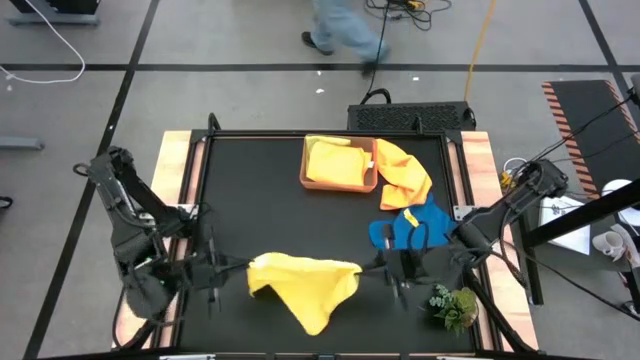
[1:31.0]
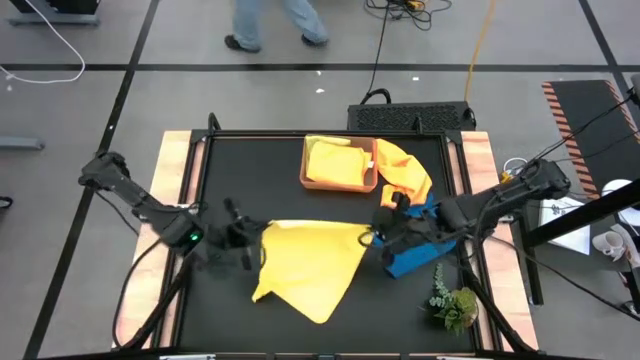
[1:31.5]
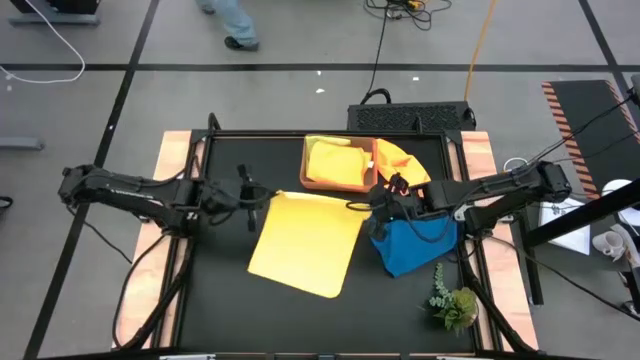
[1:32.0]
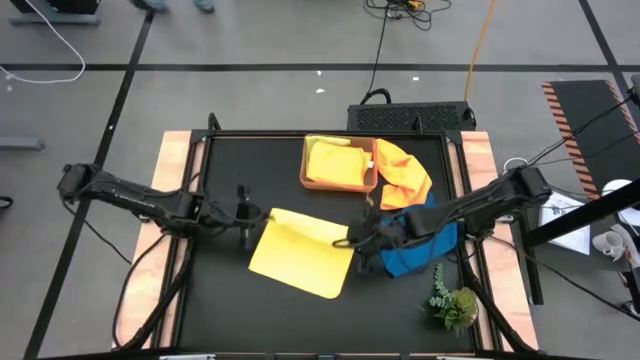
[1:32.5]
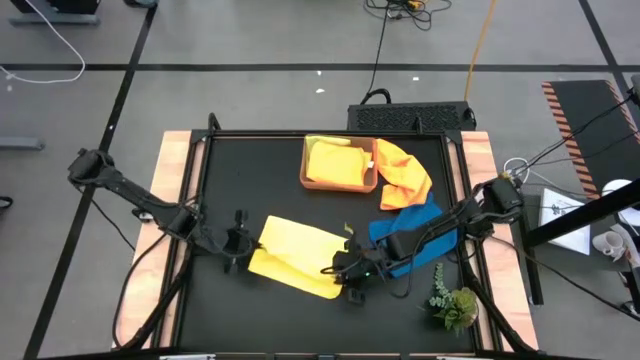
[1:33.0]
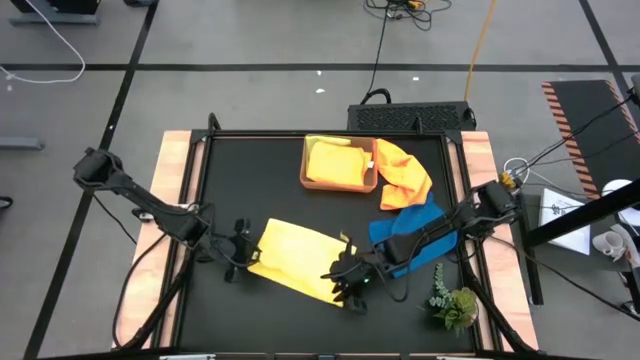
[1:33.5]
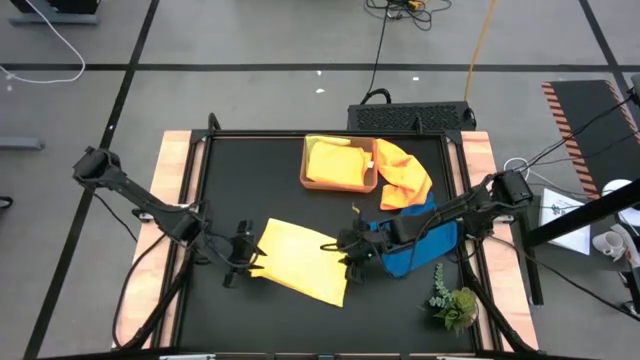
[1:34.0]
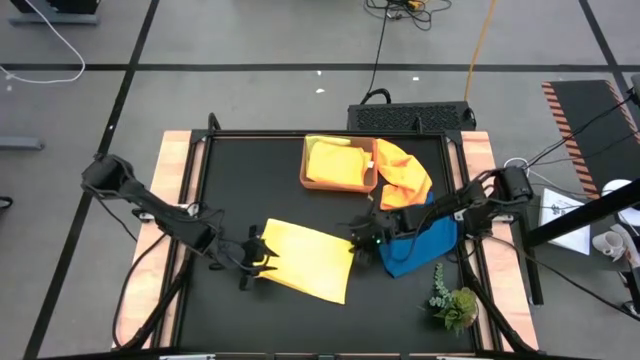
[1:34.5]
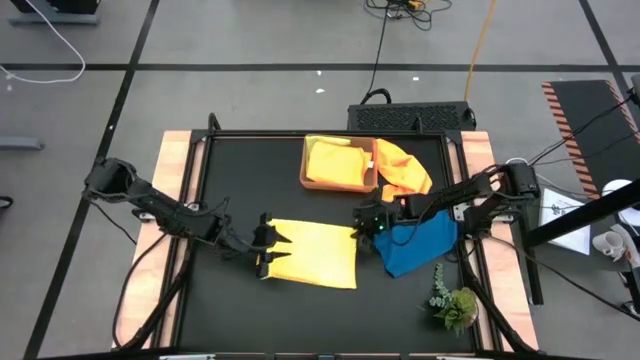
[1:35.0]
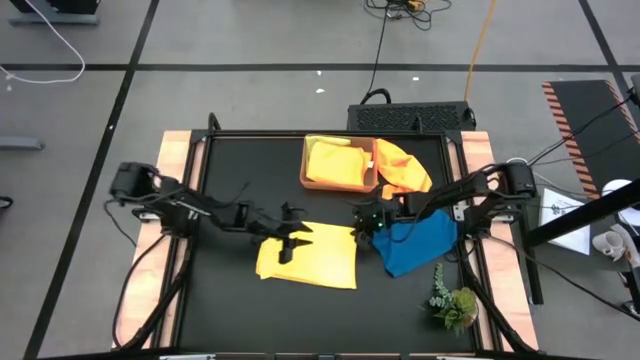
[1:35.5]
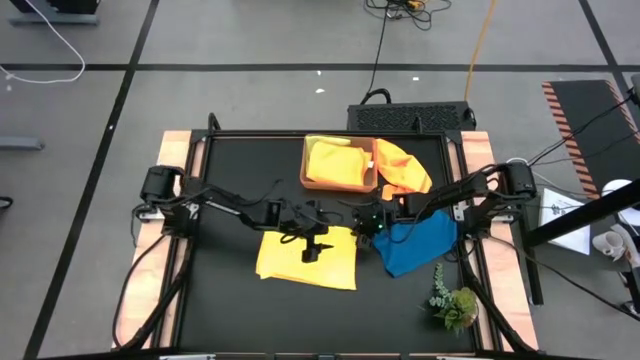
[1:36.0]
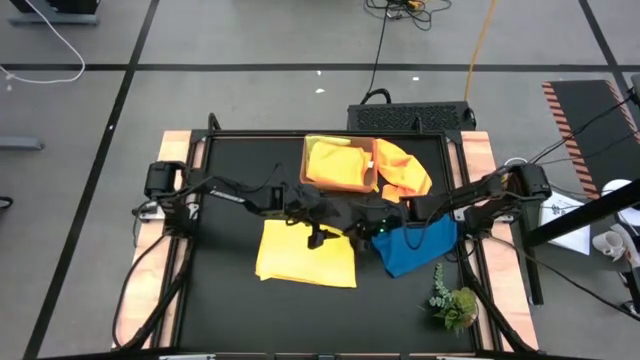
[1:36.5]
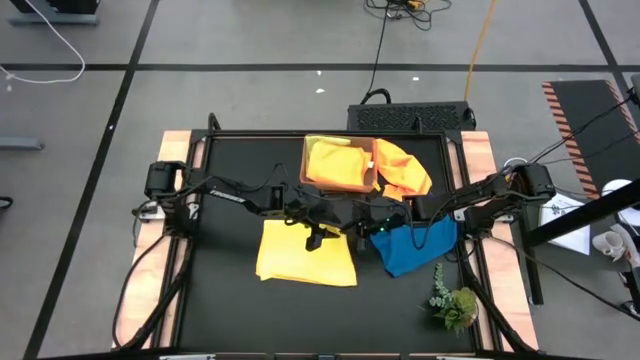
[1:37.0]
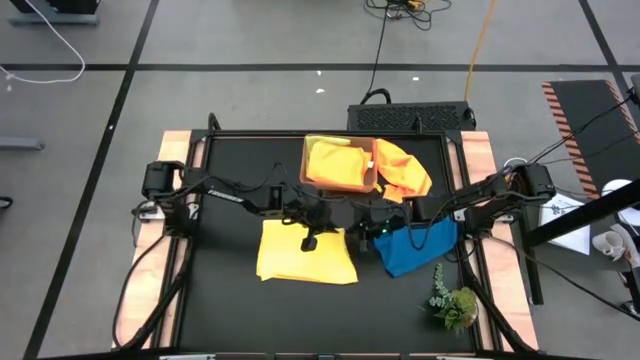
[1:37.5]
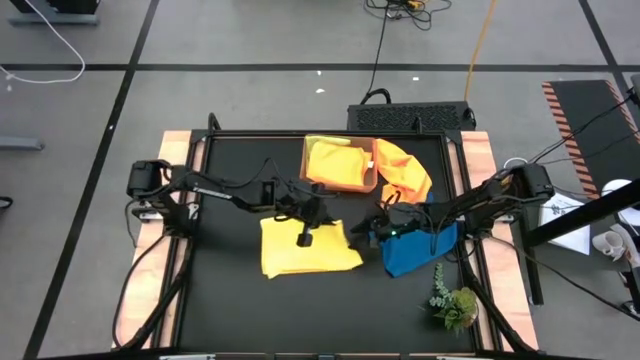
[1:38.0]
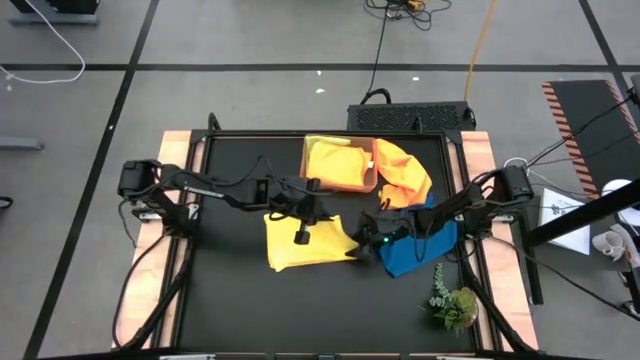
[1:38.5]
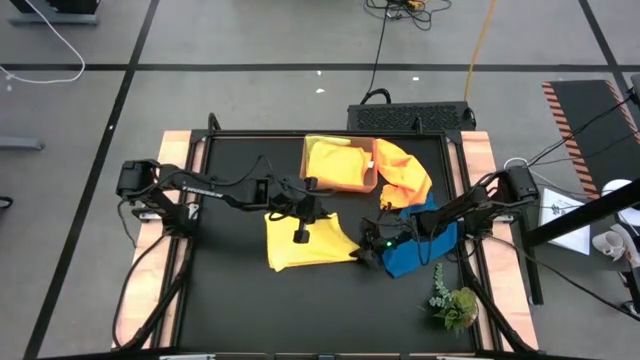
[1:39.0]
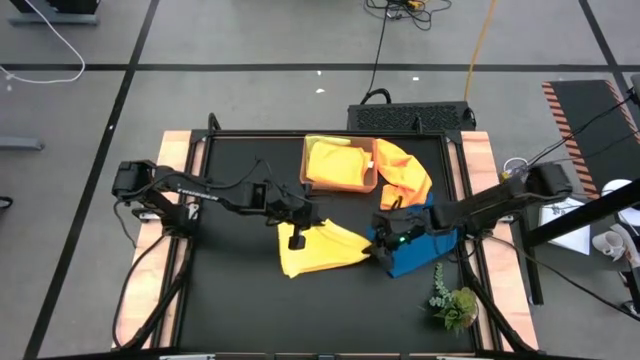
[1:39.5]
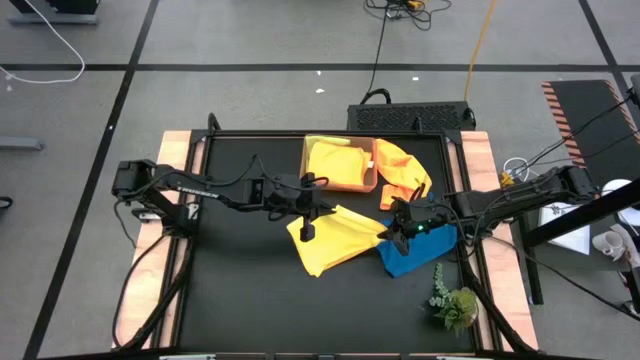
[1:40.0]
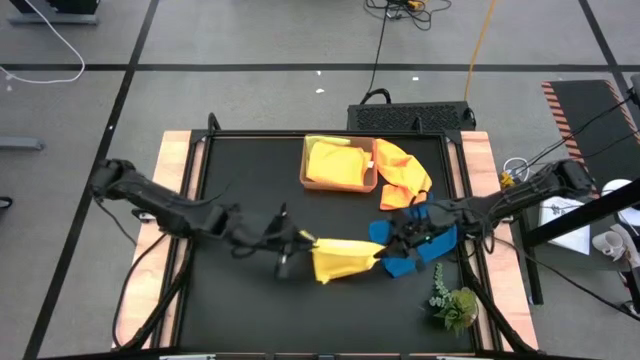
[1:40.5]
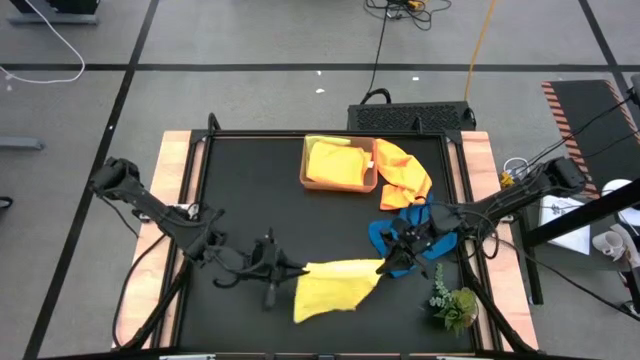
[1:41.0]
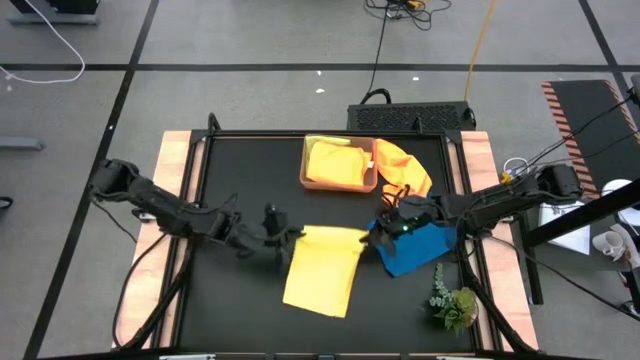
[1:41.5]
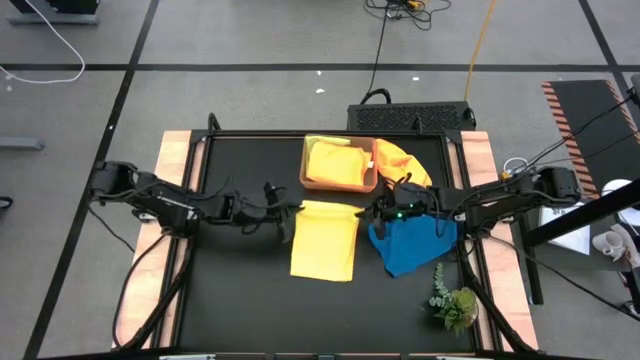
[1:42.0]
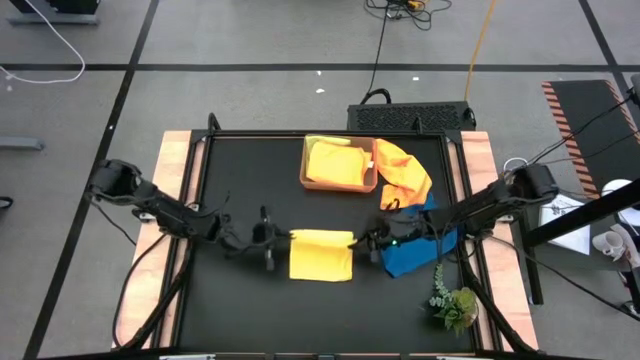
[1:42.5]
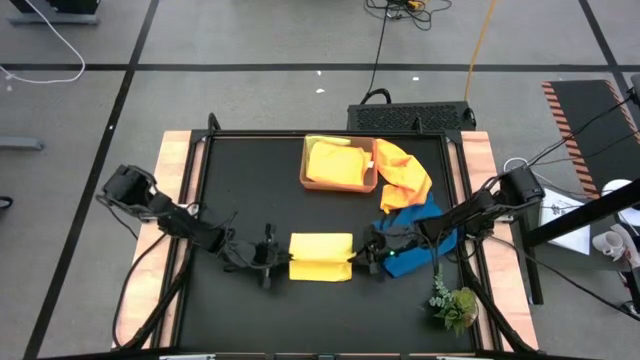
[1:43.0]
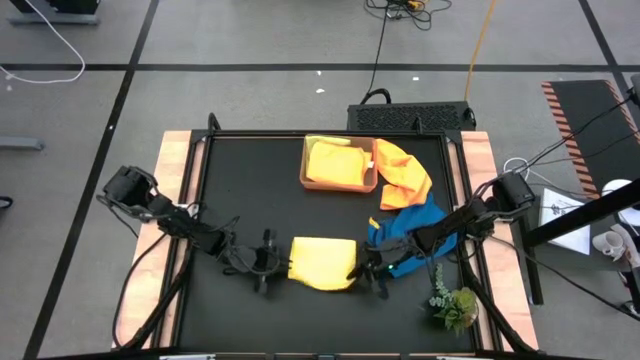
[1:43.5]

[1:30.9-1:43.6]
Task: Fold microfiber towels
Fold the yellow microfiber cloth

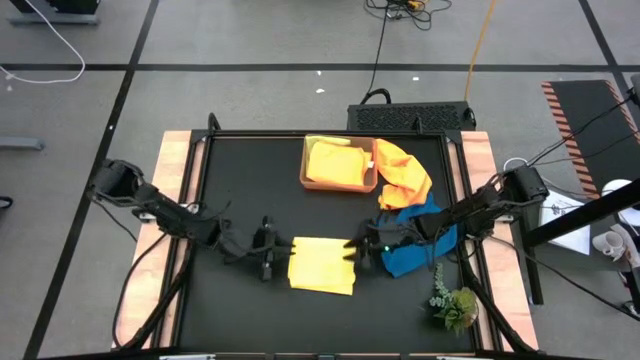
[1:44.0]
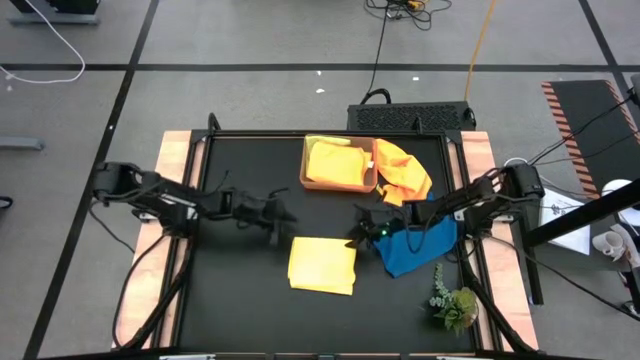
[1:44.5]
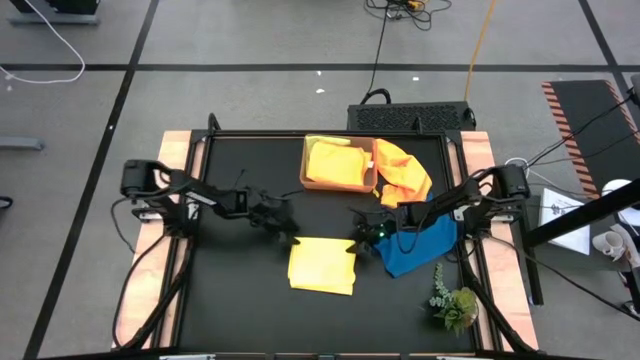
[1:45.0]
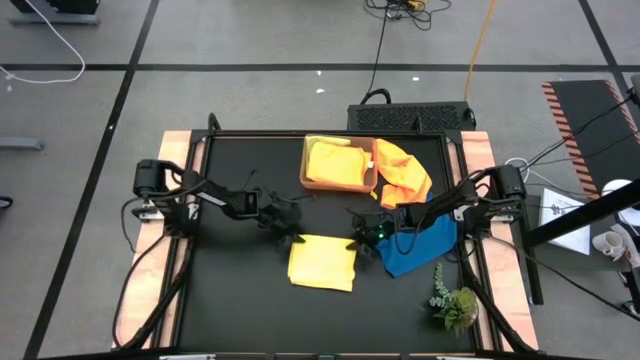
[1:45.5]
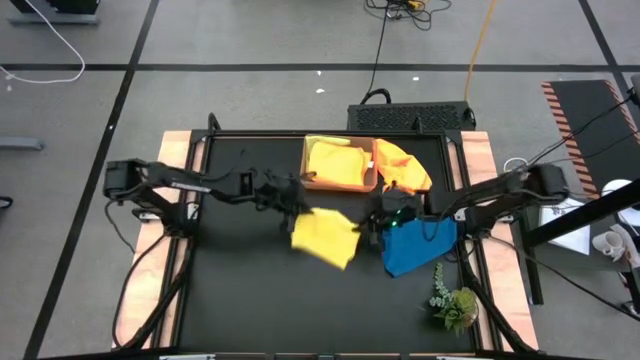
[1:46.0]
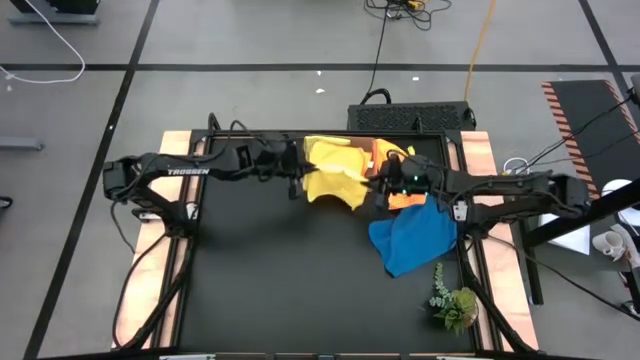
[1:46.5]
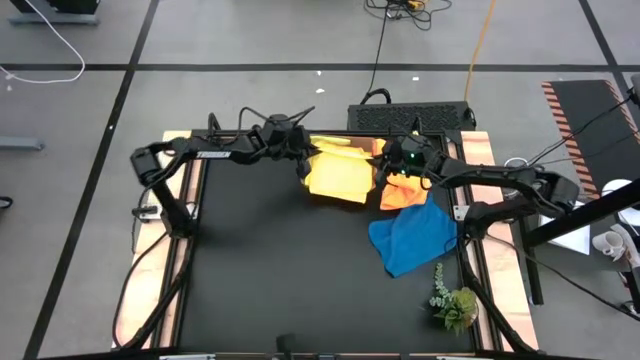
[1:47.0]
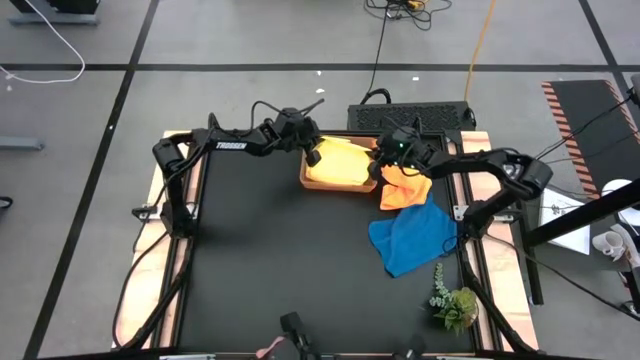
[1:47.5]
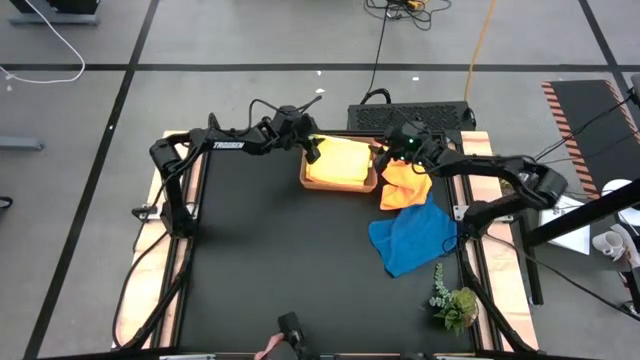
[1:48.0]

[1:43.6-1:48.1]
Put the yellow microfiber cloth into the orange bin

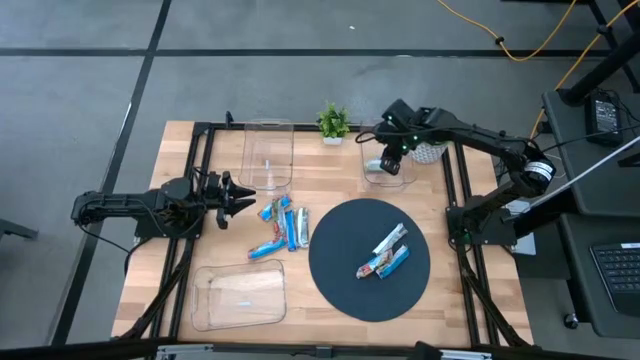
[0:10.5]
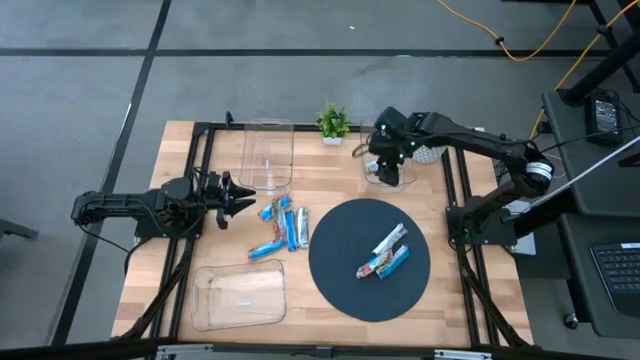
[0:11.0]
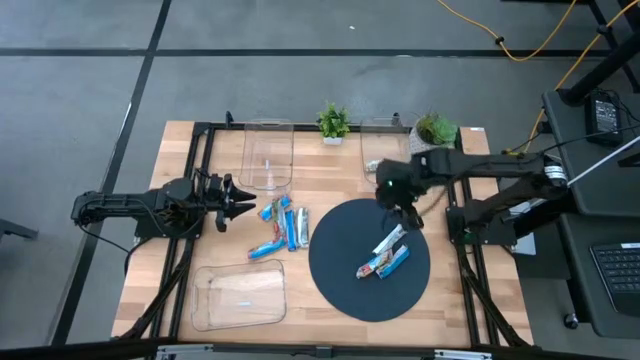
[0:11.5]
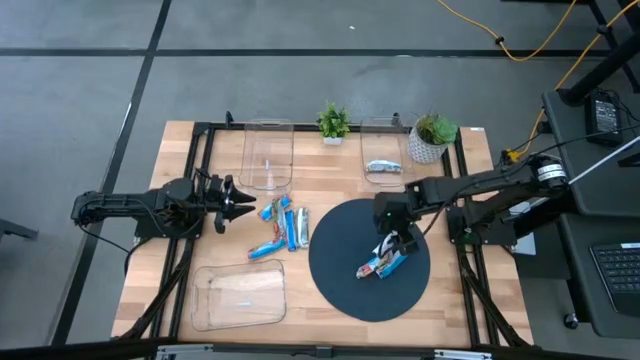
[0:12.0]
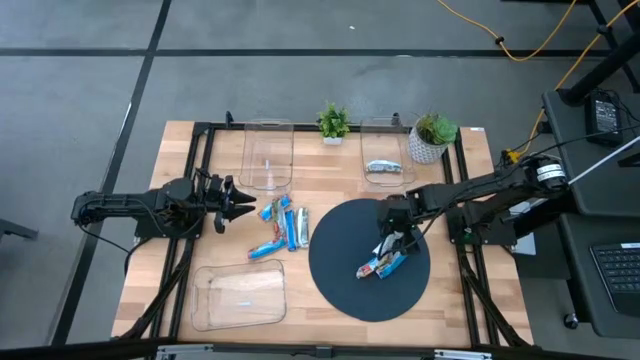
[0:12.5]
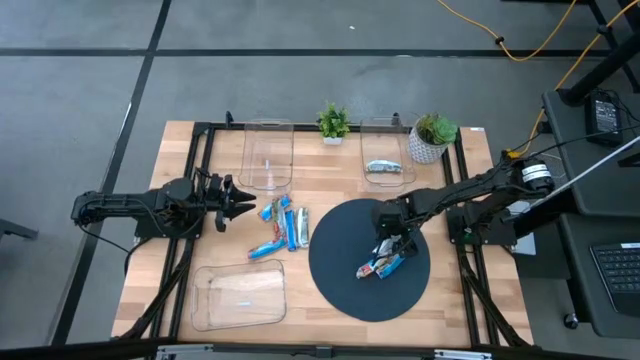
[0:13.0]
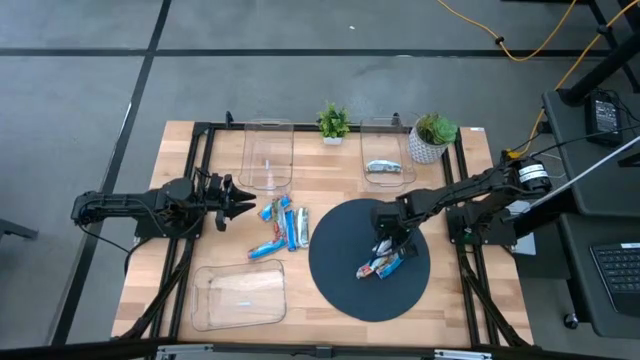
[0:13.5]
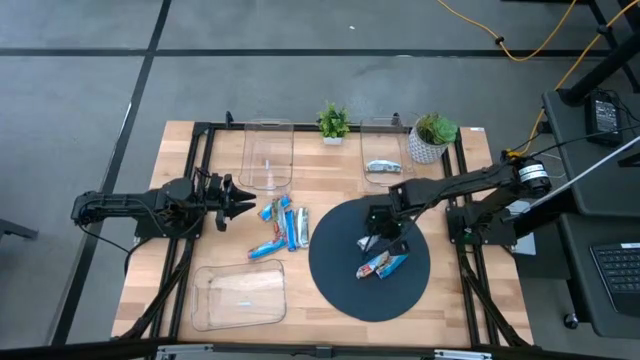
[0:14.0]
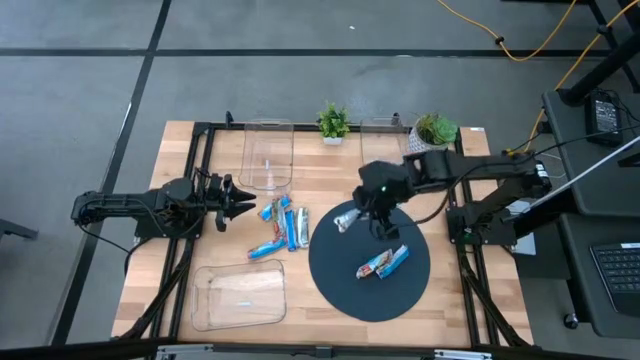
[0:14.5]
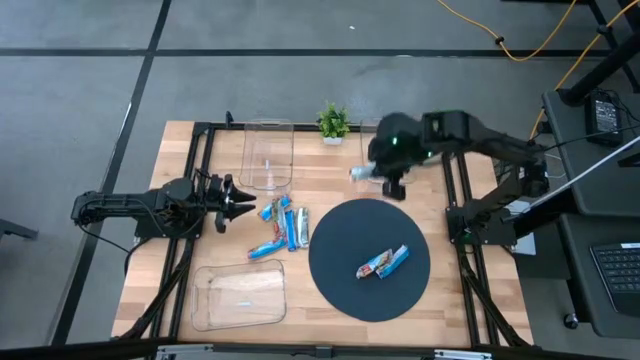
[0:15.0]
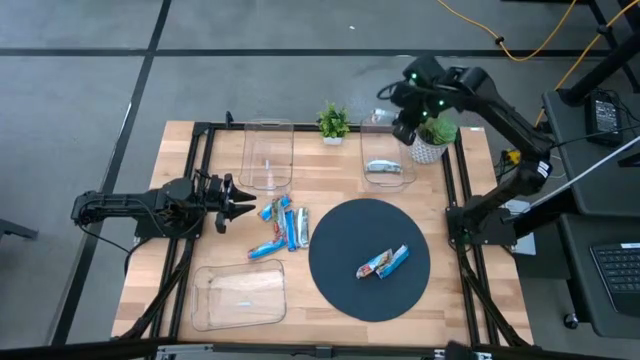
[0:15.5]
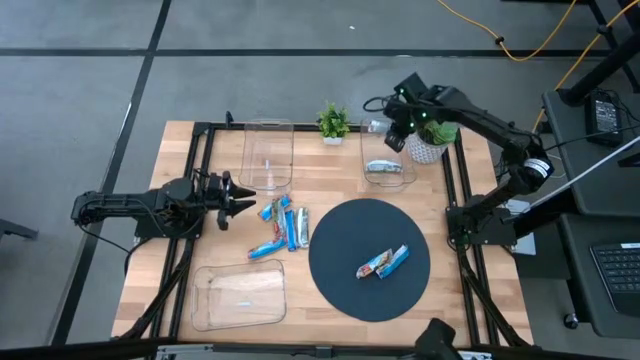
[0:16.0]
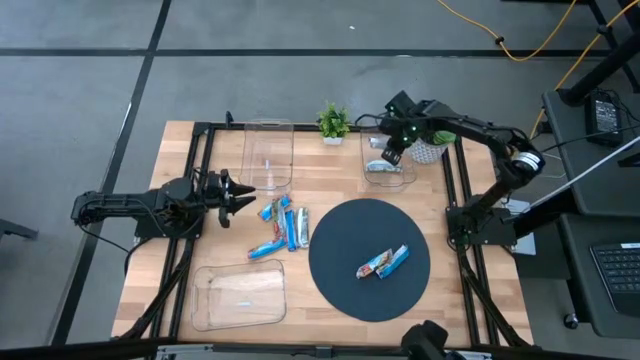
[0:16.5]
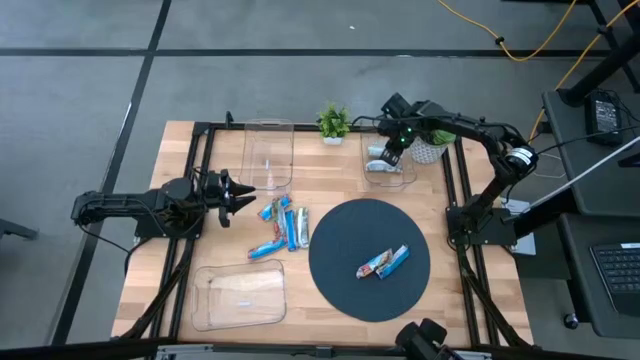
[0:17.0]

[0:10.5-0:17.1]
Task: Pick and place Granola Bars by type
Put the yellow granola bar into the top right transparent bin
